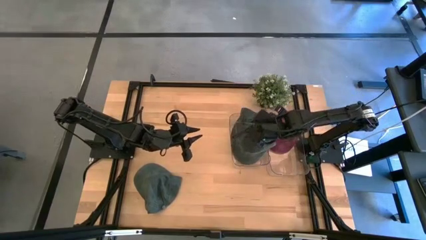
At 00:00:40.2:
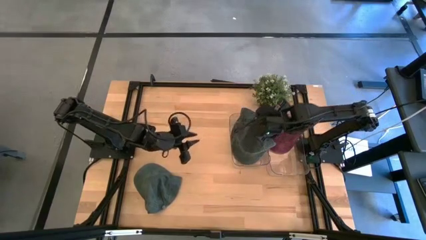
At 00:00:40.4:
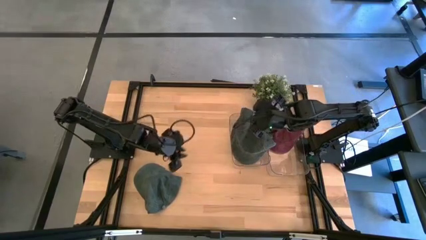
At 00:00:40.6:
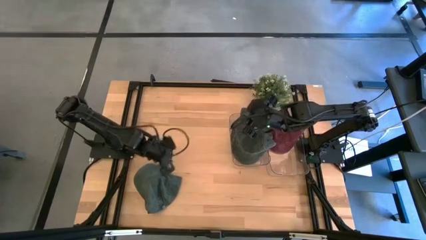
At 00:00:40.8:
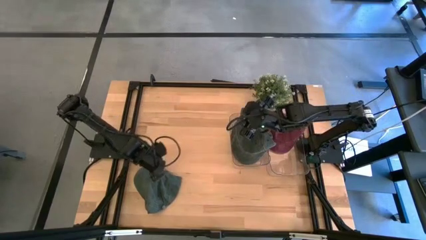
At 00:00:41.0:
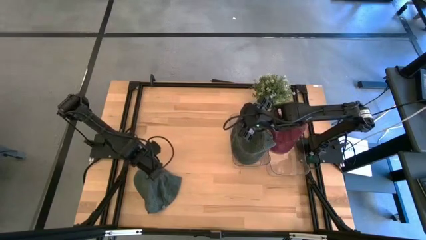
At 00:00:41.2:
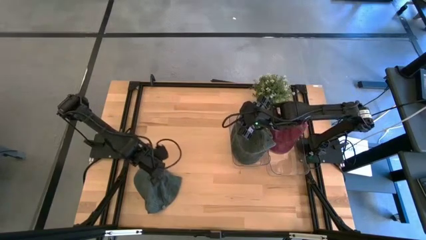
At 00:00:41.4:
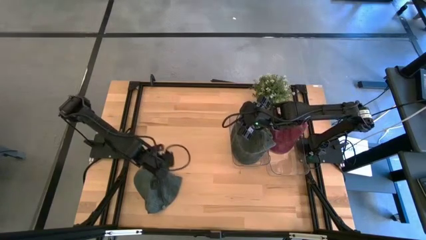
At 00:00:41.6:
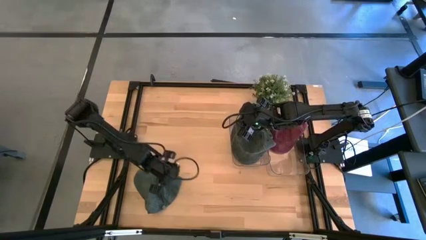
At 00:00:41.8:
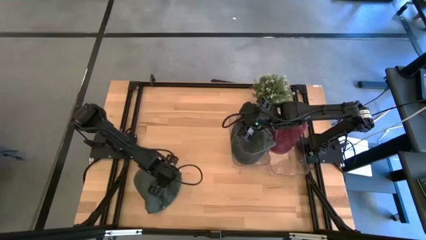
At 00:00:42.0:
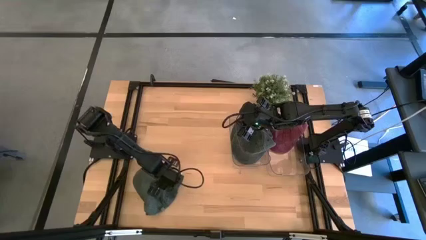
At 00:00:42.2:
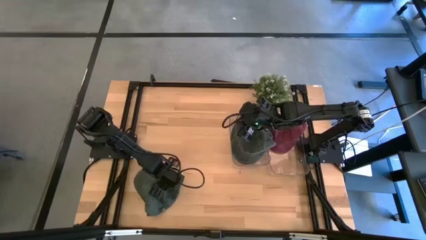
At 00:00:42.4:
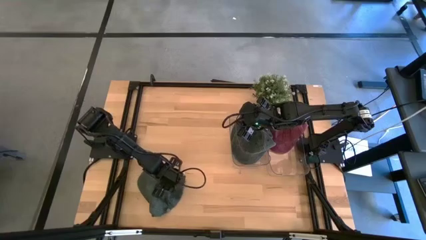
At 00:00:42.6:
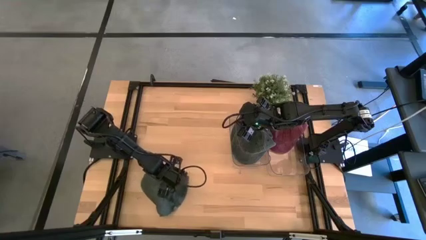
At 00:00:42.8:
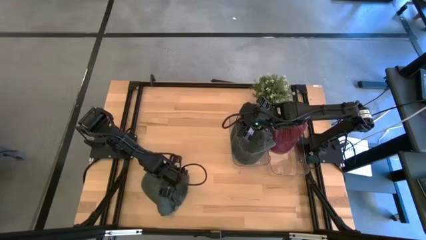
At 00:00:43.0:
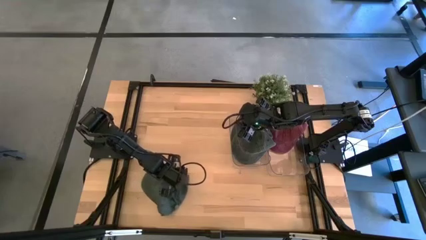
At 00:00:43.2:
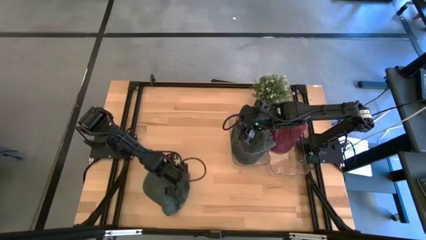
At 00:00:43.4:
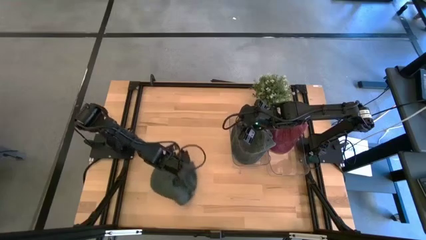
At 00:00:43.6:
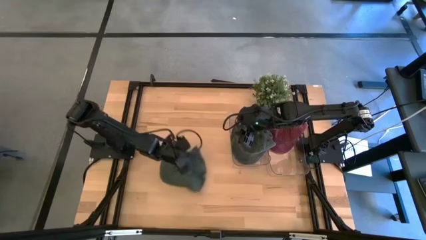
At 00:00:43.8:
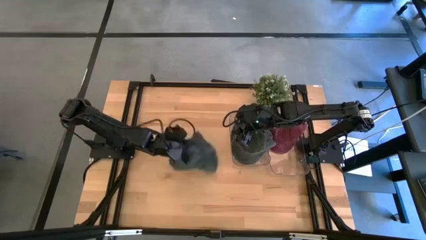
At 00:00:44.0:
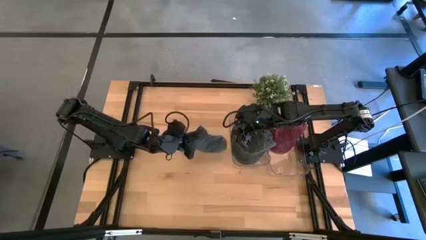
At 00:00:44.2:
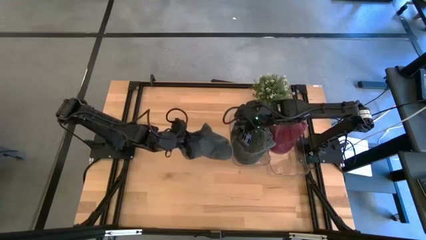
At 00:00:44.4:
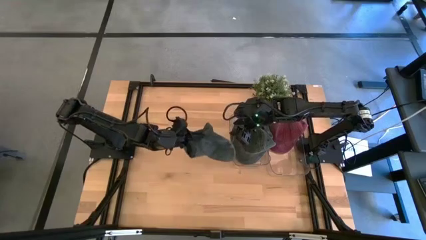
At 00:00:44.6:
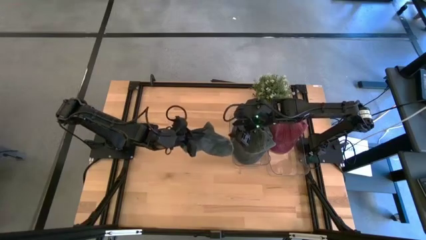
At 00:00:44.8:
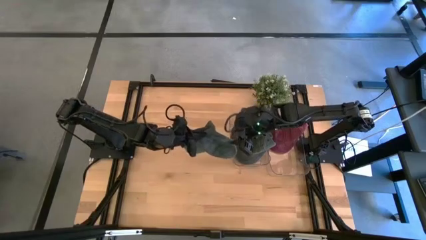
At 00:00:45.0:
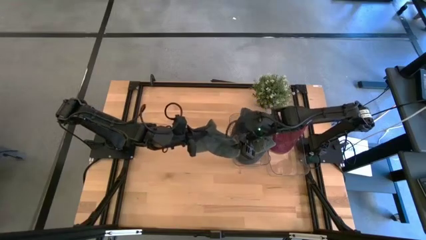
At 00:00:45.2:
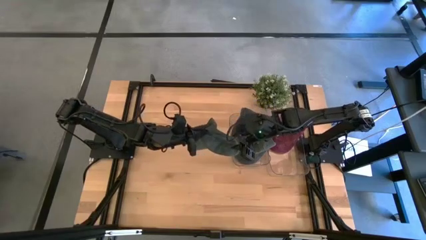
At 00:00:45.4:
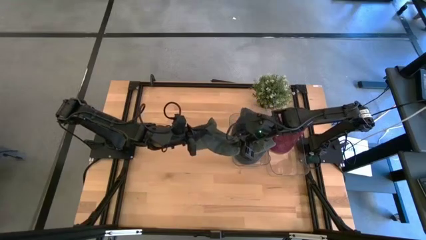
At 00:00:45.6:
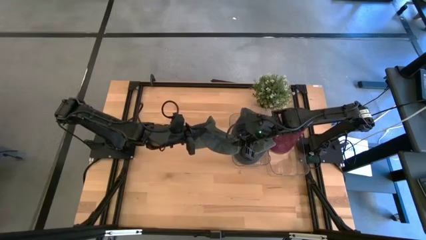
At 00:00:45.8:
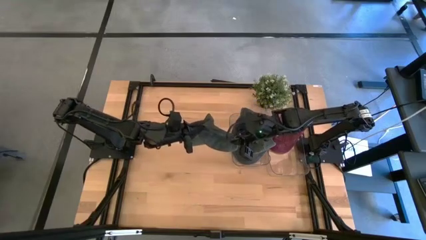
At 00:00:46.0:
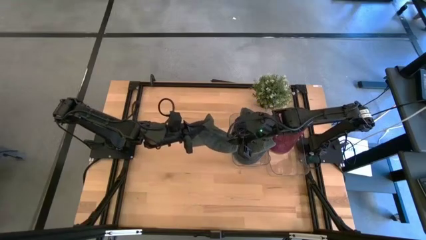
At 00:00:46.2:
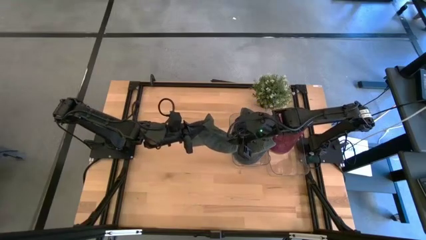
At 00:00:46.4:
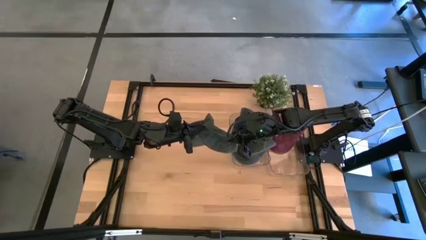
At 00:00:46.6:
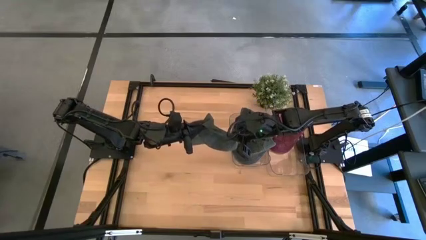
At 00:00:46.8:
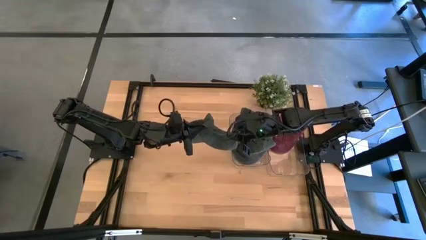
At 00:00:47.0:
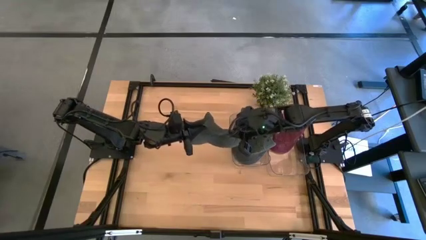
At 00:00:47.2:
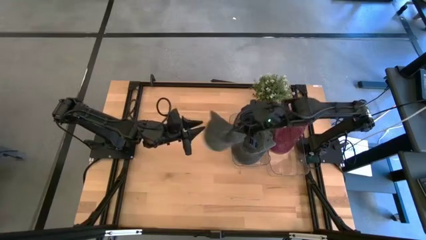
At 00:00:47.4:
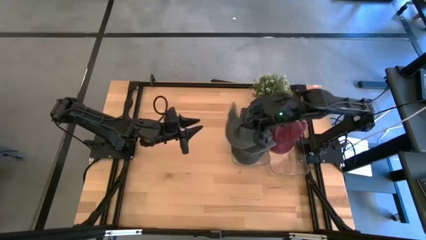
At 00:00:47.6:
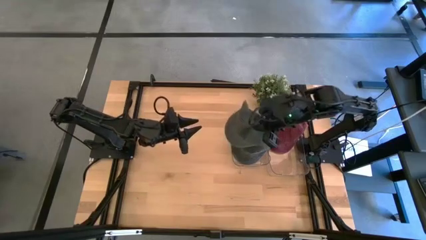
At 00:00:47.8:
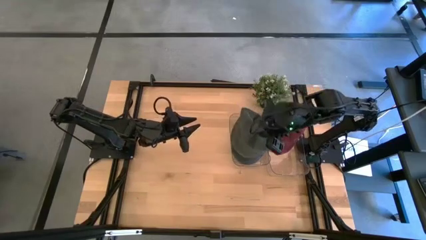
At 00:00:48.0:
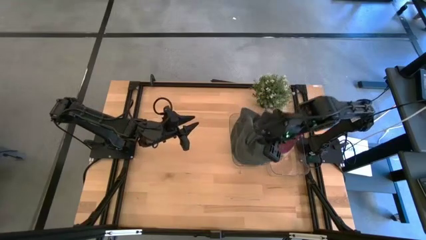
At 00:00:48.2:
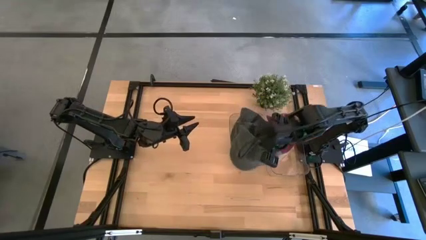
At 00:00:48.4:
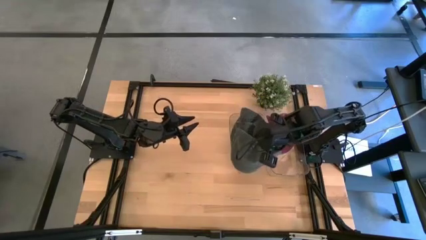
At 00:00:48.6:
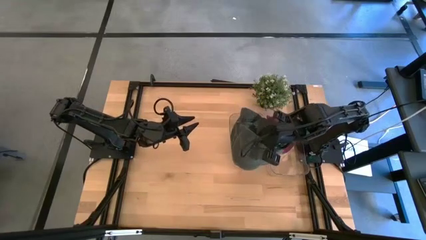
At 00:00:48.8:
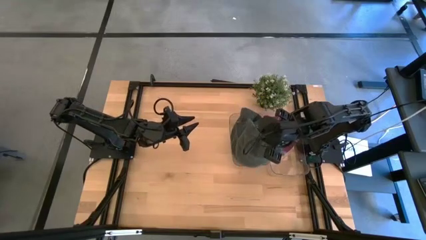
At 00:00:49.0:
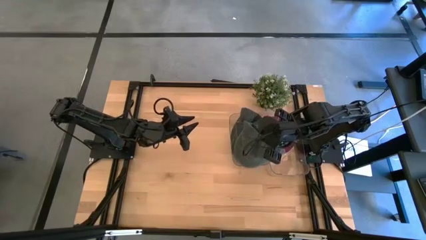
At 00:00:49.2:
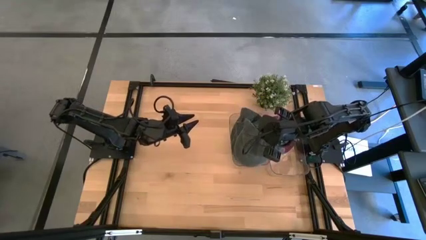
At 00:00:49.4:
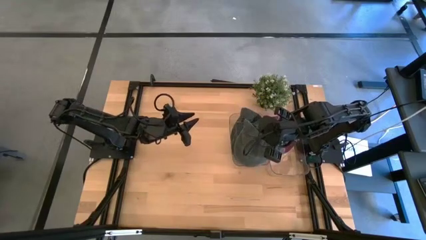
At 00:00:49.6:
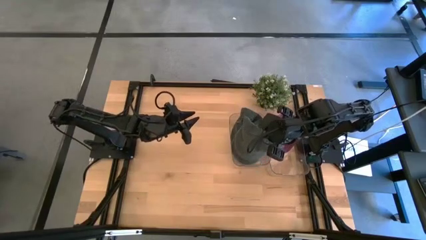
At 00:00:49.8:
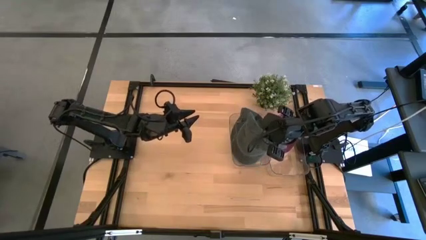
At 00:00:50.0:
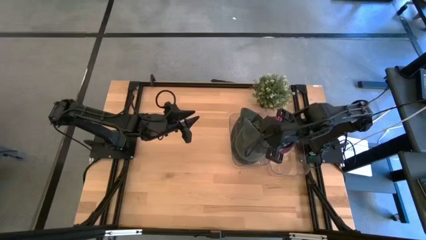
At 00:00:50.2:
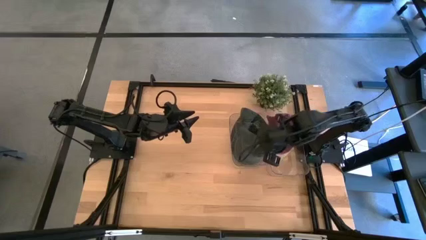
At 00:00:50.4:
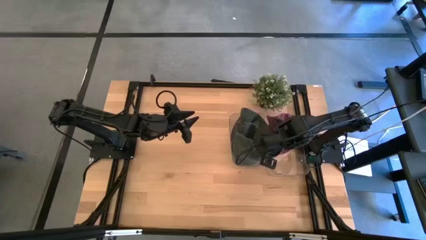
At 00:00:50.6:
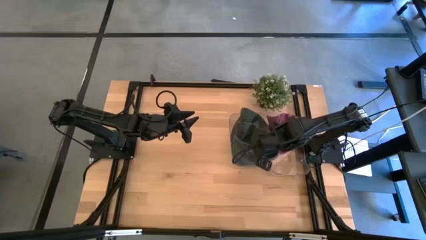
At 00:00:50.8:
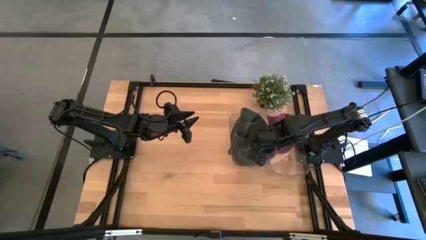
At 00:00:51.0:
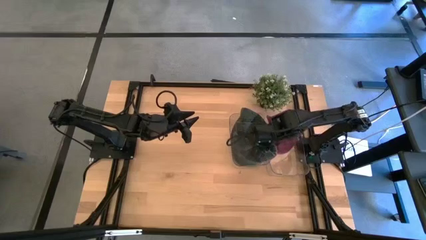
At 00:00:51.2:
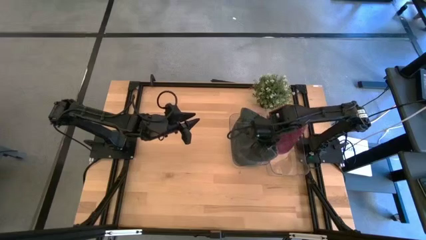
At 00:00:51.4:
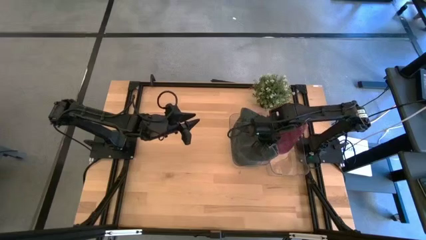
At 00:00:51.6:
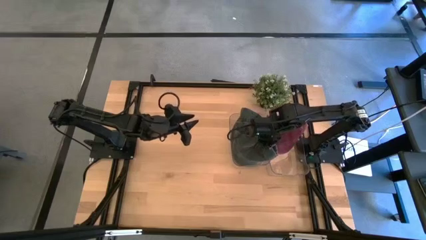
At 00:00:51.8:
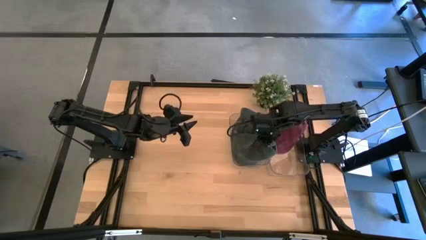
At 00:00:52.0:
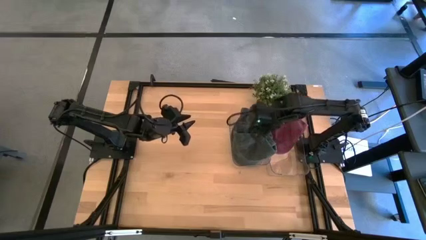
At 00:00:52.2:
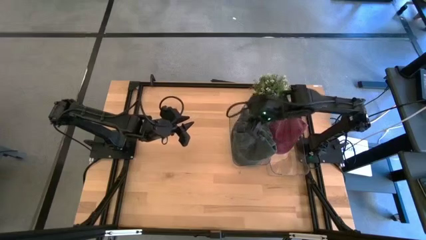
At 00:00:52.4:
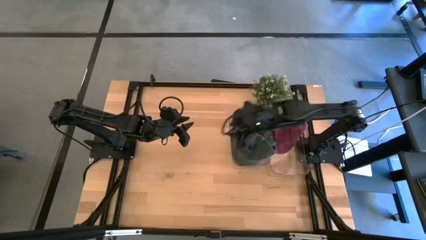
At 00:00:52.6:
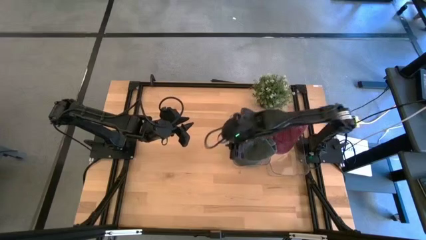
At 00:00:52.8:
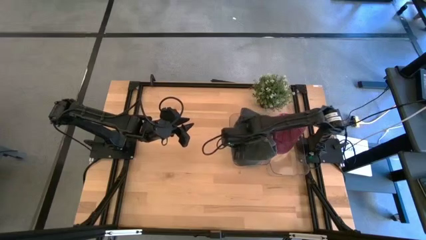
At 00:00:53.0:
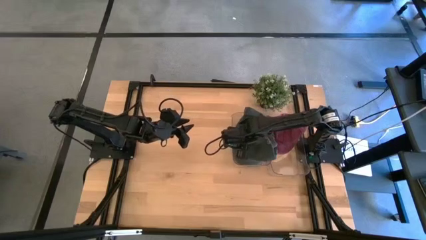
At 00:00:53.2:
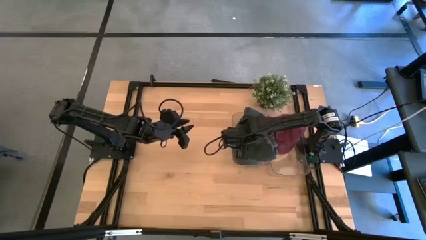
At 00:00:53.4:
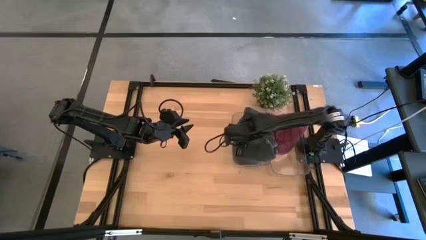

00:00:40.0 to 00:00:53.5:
Task: Pick & Place hat
Put the black cap into the left transparent bin

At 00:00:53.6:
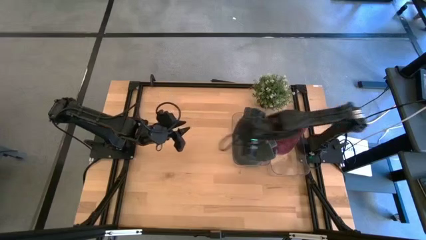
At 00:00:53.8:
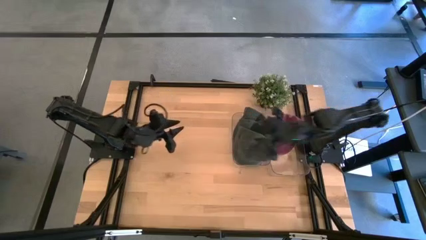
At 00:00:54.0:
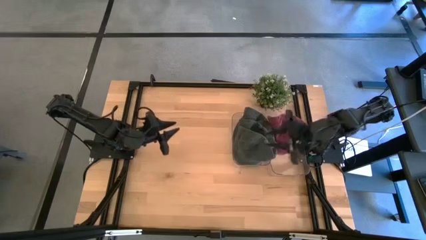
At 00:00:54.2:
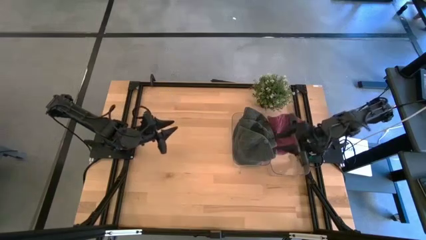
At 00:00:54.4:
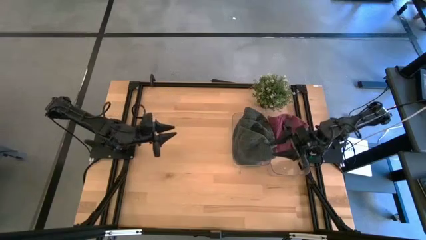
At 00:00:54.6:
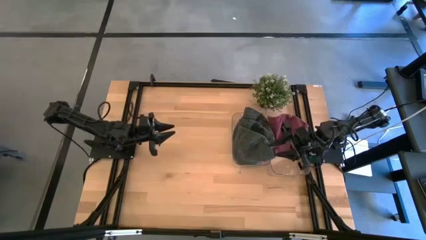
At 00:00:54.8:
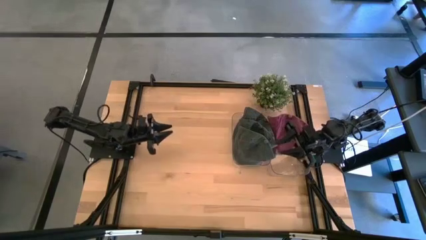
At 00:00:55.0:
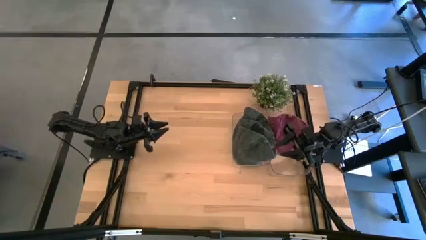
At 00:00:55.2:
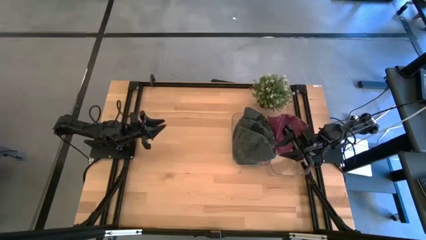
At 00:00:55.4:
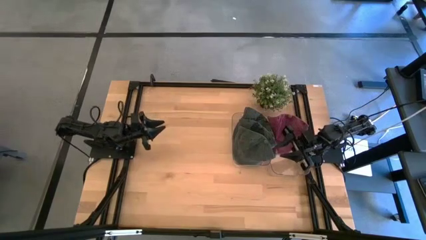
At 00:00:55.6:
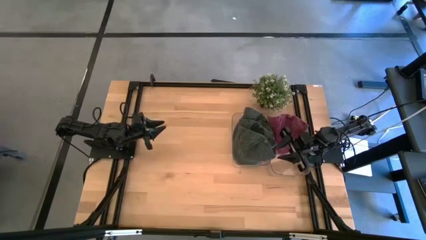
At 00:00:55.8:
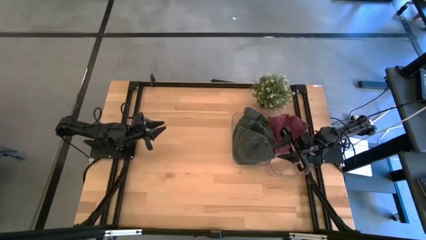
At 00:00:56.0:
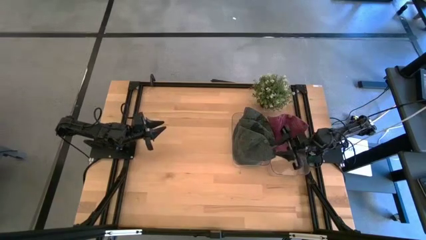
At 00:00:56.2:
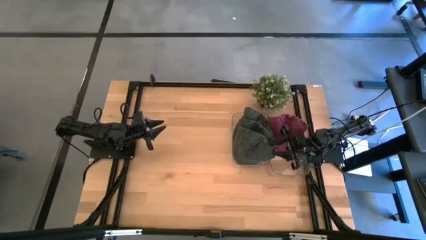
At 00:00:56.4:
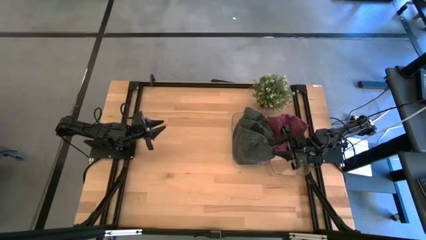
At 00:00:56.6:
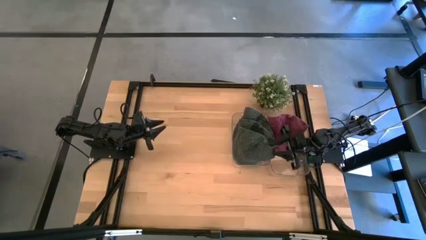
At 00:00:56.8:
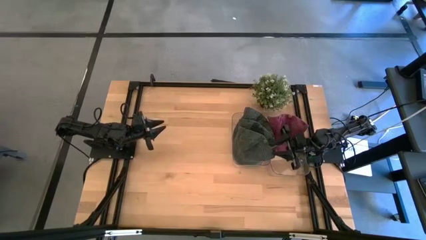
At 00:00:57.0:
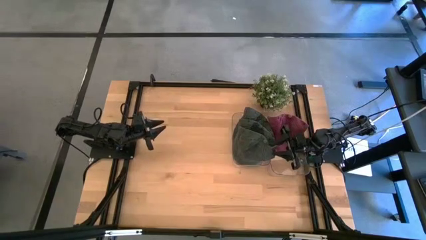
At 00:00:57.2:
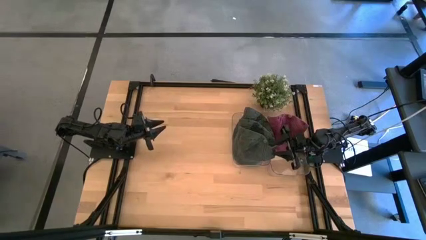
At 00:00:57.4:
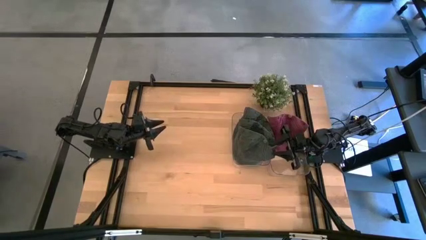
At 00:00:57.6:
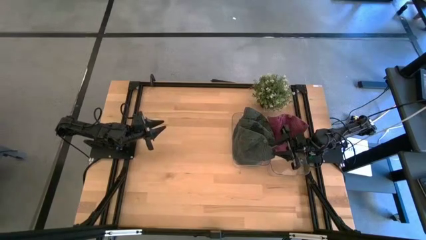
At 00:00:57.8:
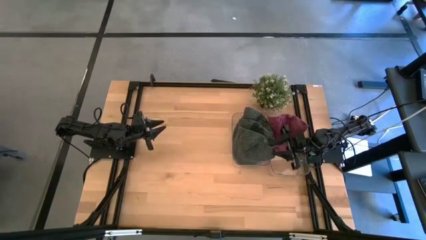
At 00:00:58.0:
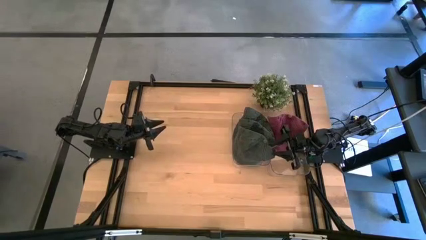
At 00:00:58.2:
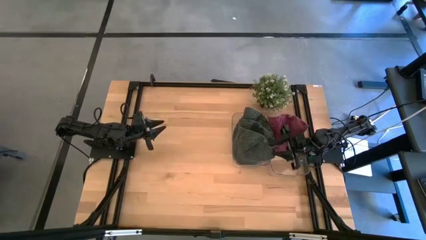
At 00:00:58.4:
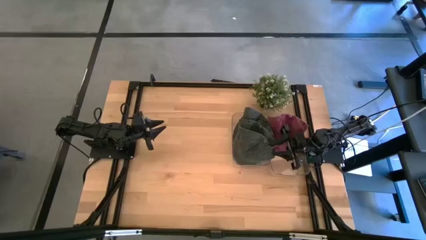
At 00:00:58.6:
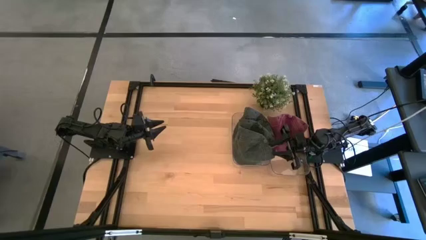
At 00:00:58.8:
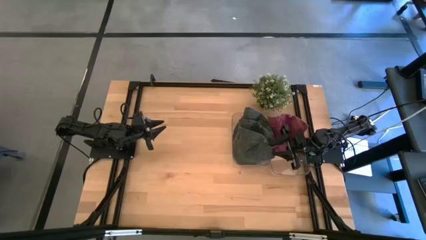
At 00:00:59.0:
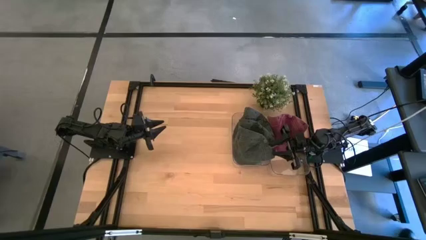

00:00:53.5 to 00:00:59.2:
Return to home position
